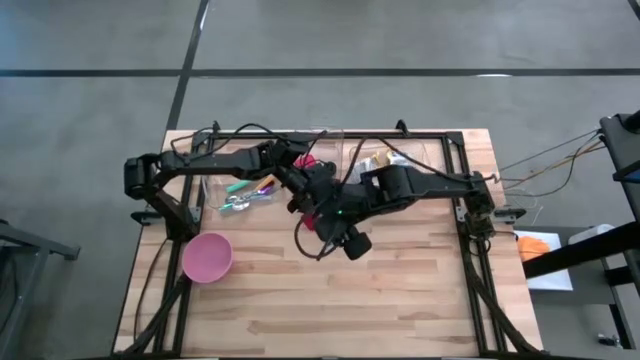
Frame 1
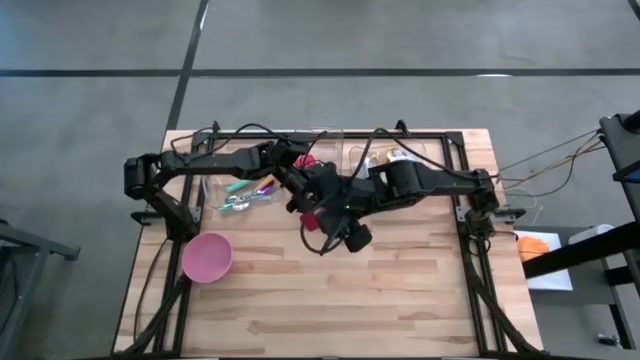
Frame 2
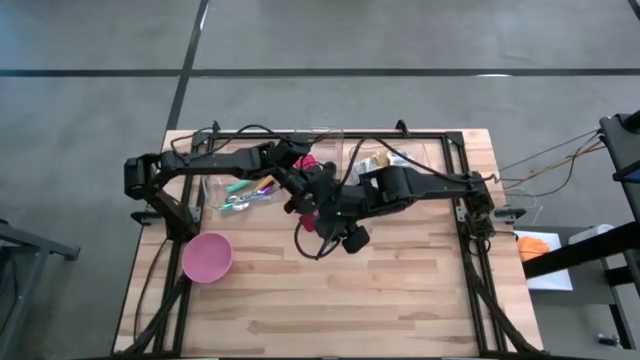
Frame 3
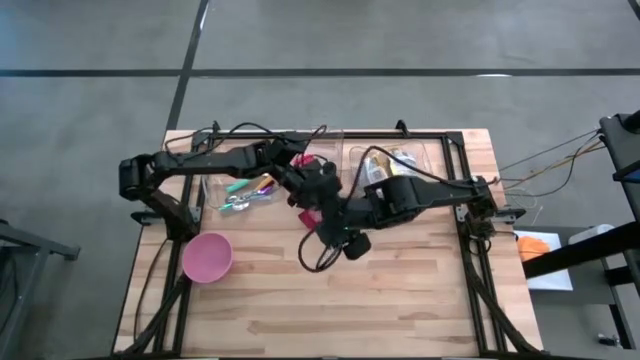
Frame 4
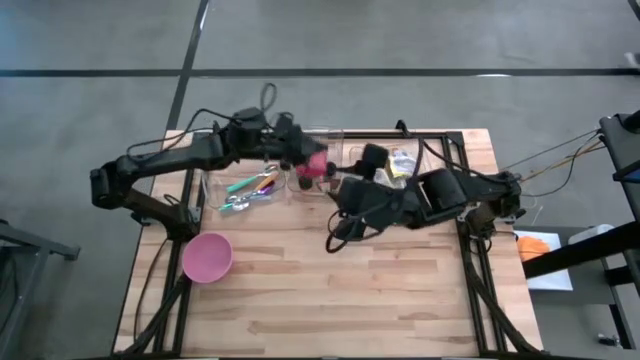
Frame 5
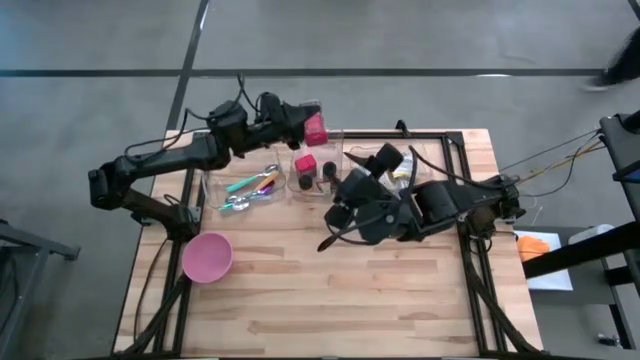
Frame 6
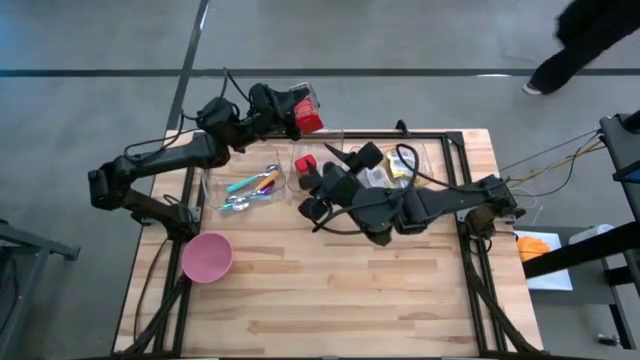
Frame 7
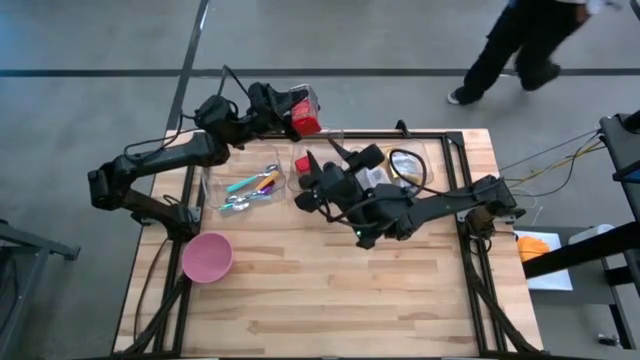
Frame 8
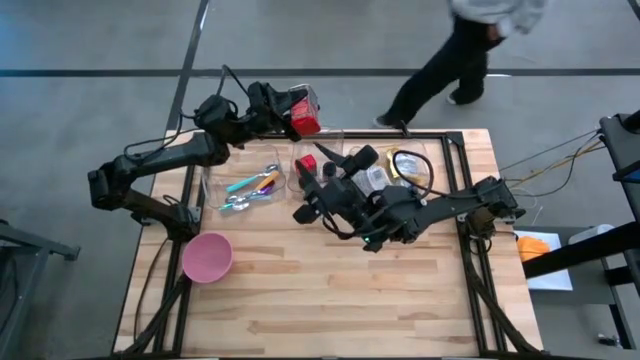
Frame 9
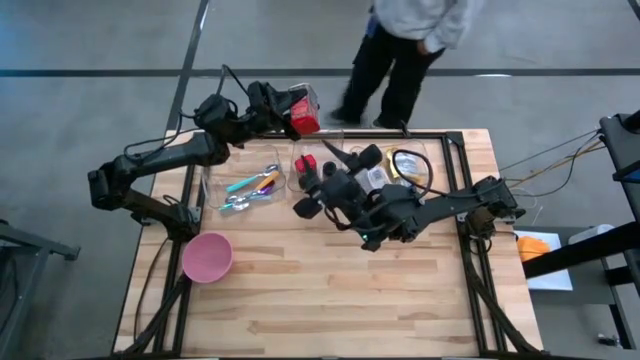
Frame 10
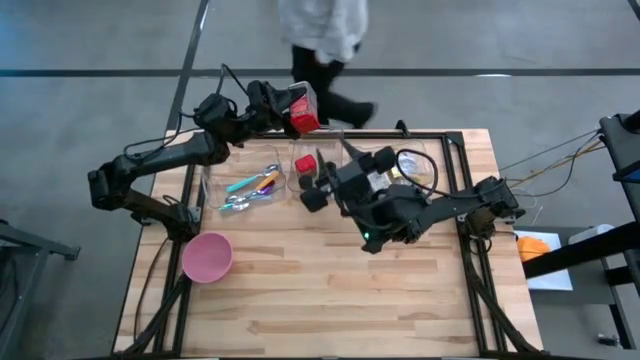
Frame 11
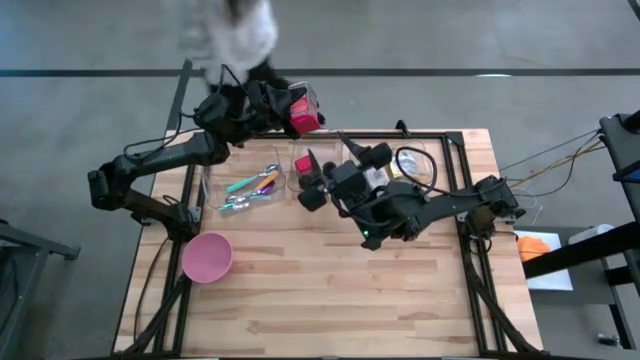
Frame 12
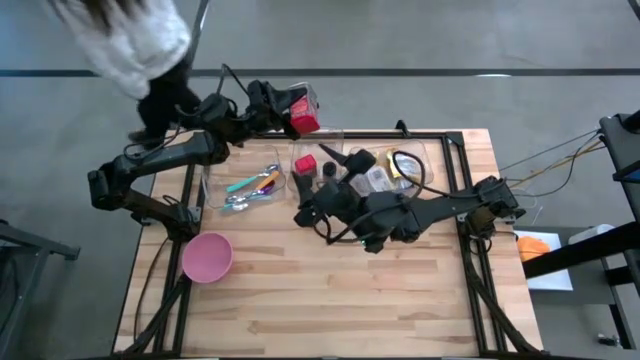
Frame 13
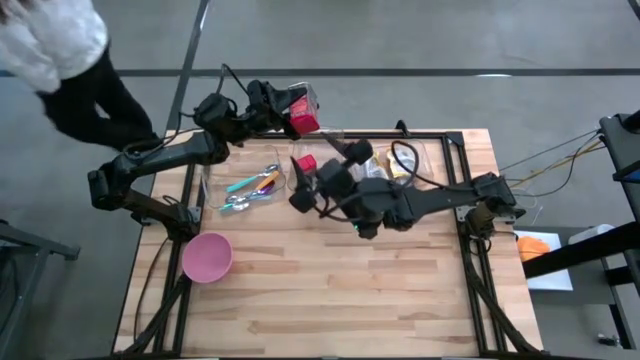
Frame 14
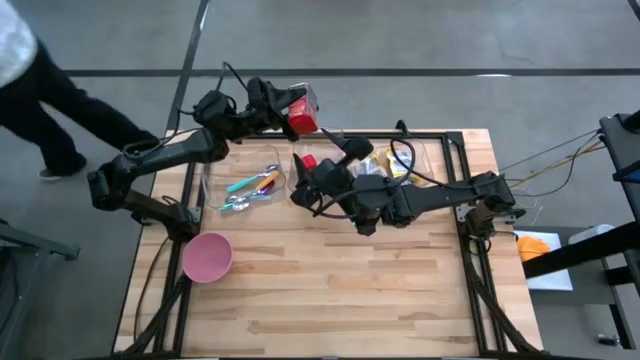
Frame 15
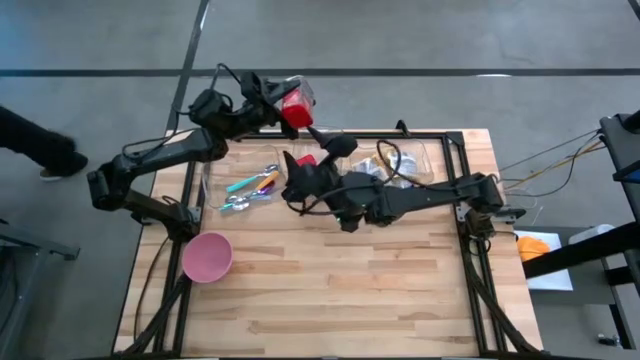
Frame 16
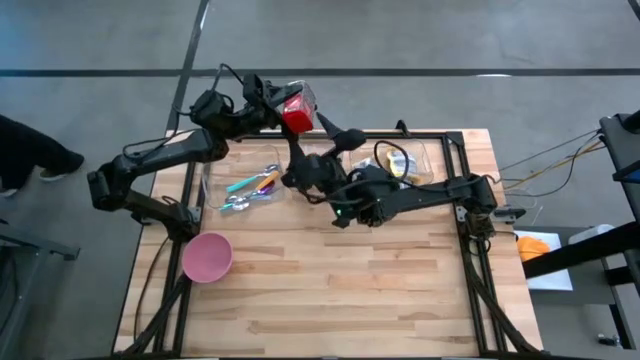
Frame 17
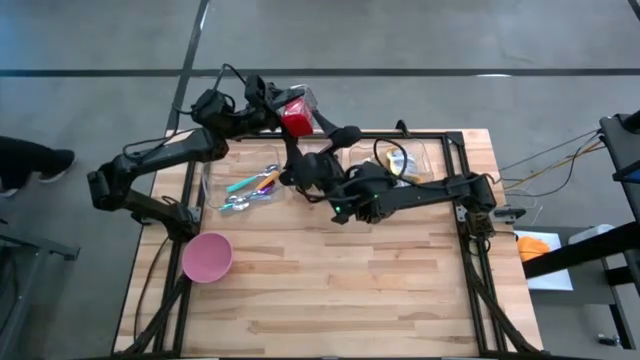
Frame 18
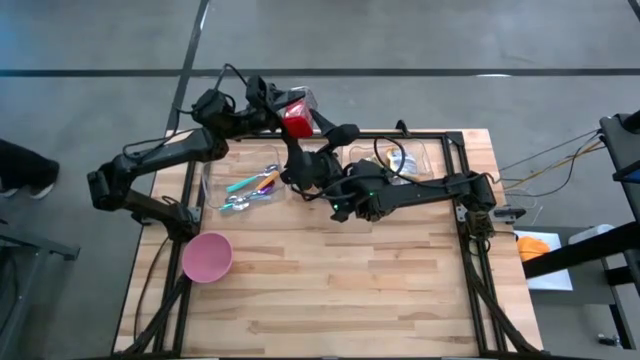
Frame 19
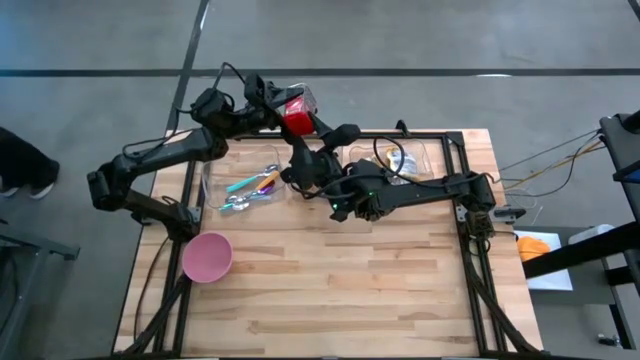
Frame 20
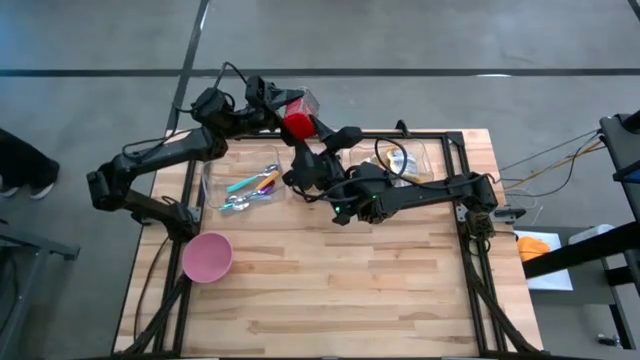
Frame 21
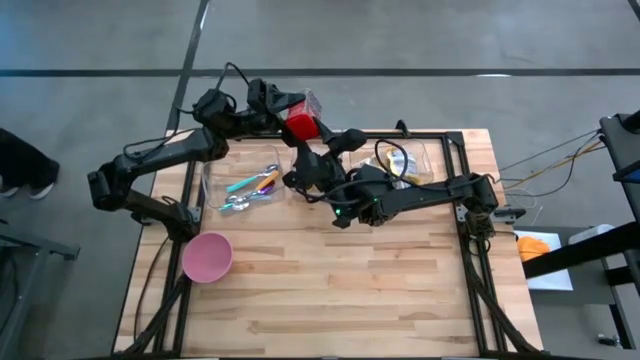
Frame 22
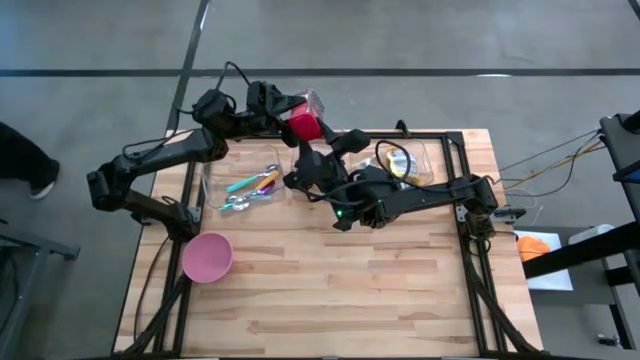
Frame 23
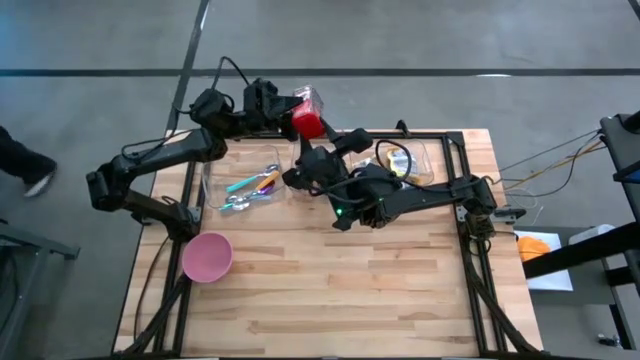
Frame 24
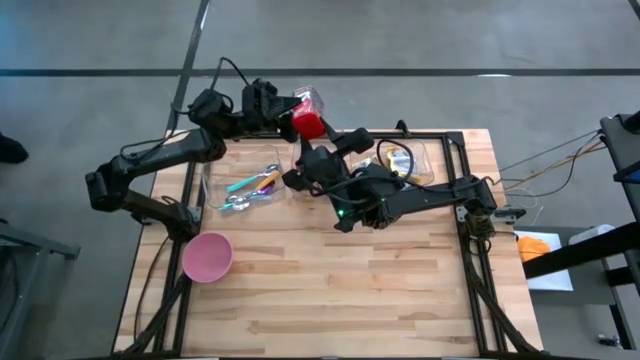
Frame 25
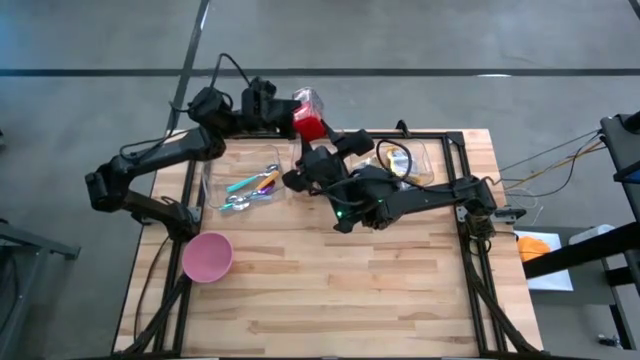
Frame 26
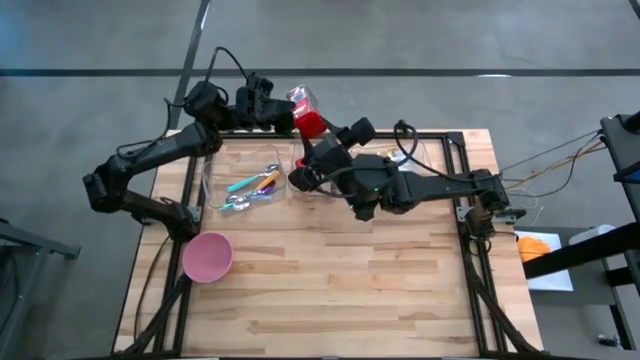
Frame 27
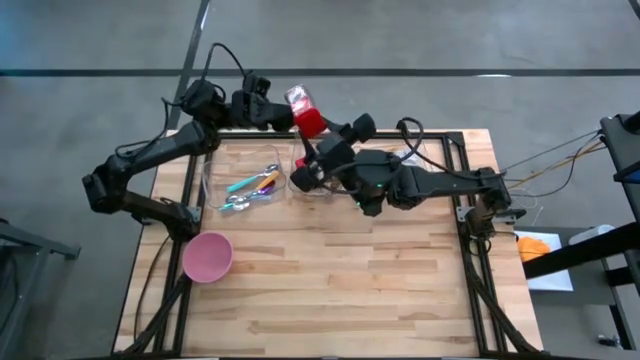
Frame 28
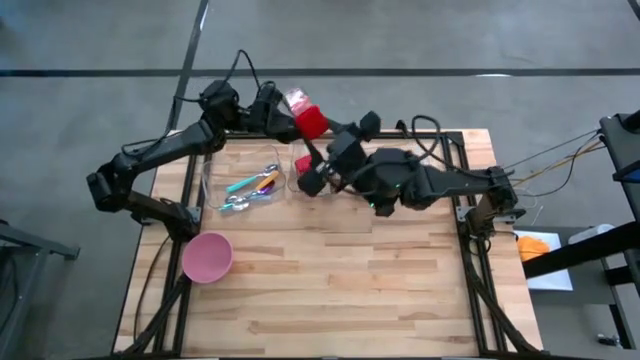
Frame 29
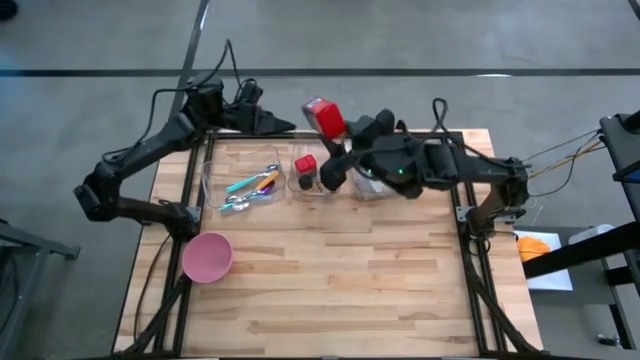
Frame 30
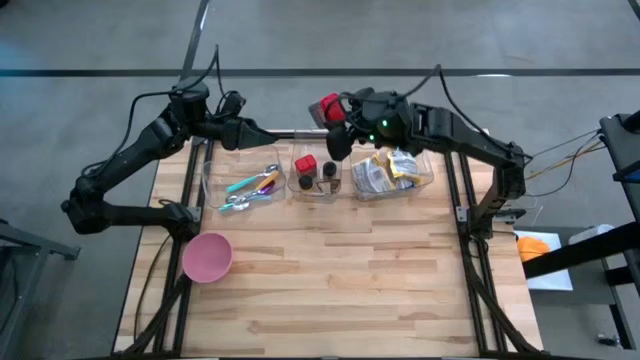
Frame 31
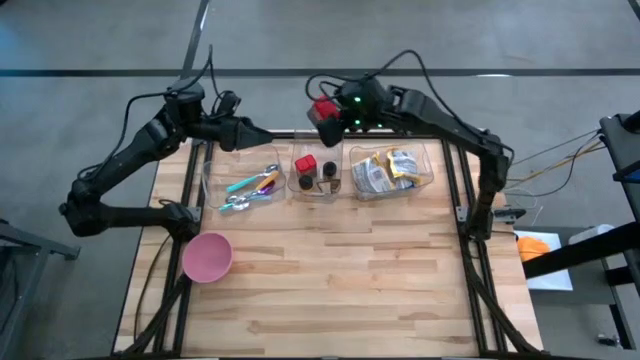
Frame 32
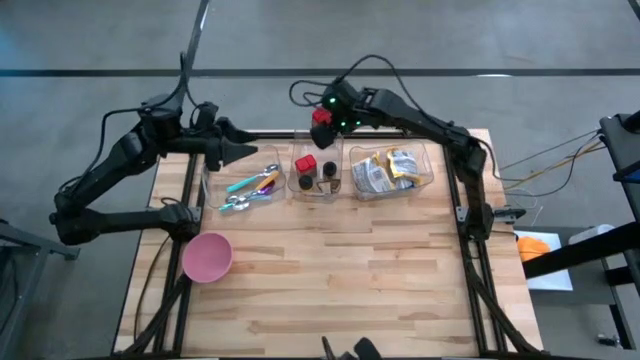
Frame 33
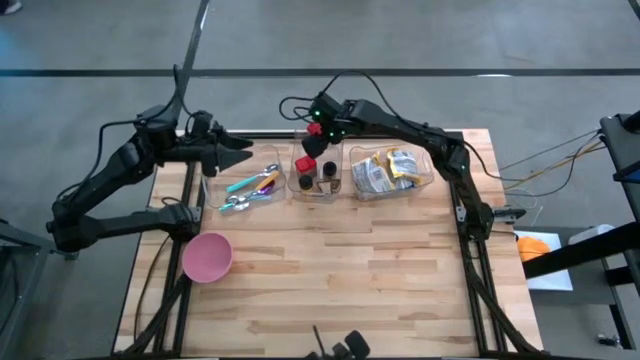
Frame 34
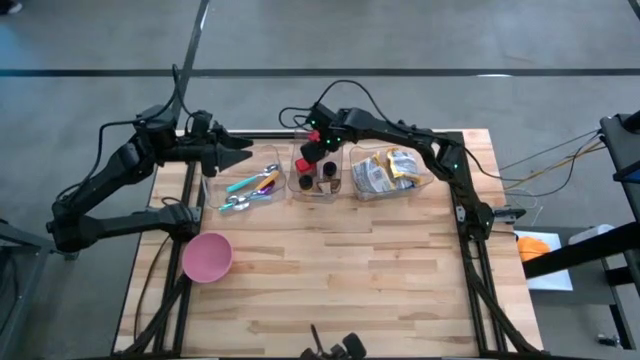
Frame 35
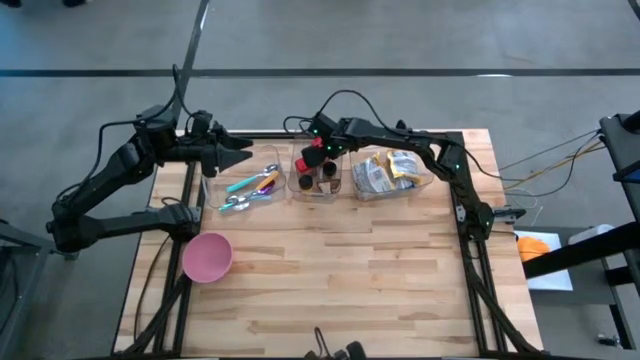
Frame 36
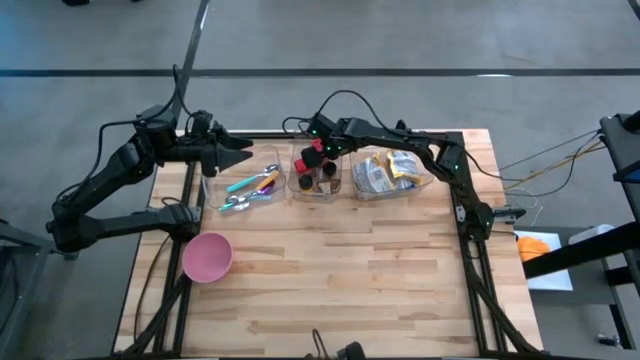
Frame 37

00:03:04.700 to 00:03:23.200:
Put the red seasoning can into the middle transparent bin
